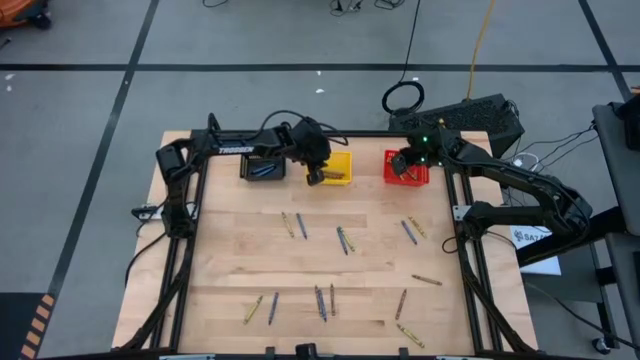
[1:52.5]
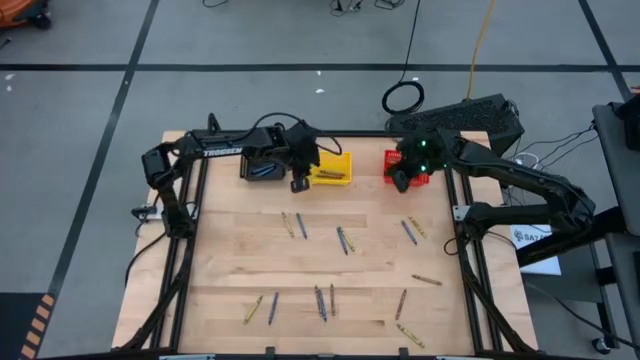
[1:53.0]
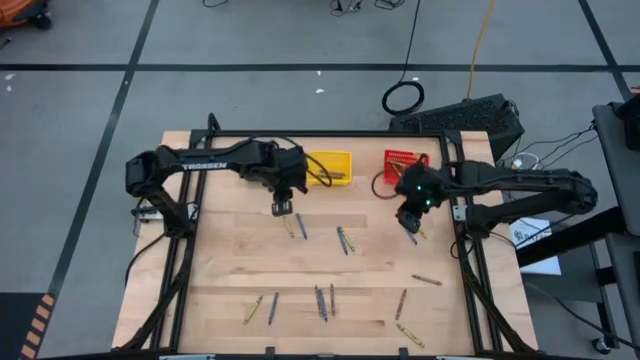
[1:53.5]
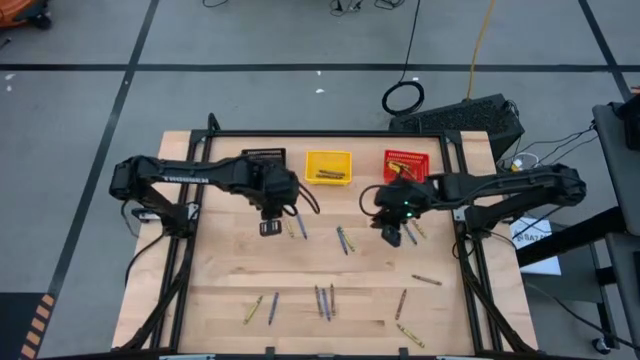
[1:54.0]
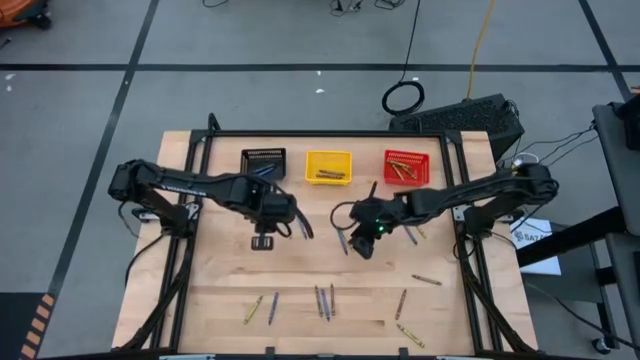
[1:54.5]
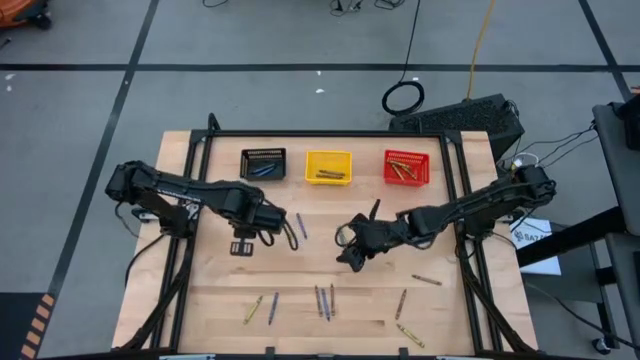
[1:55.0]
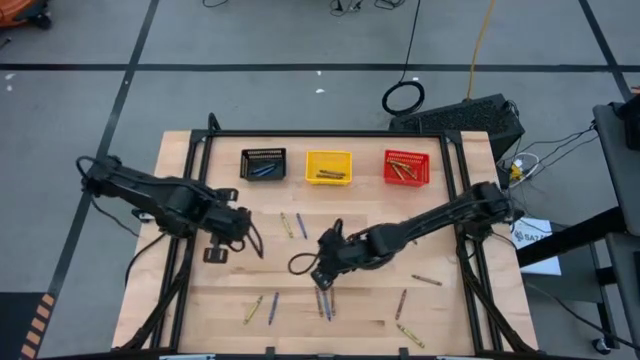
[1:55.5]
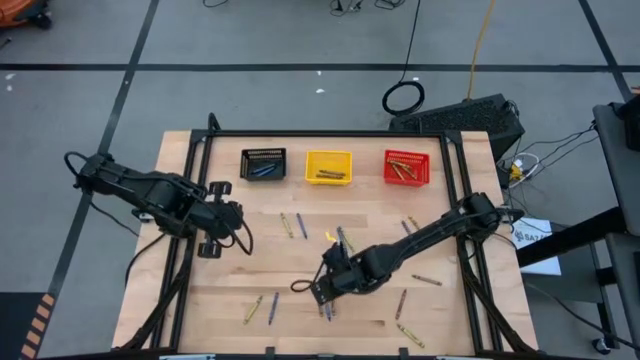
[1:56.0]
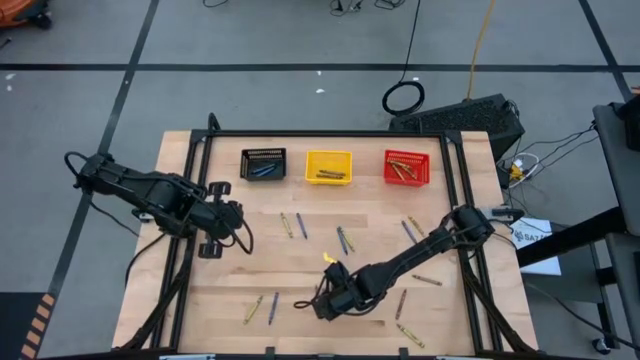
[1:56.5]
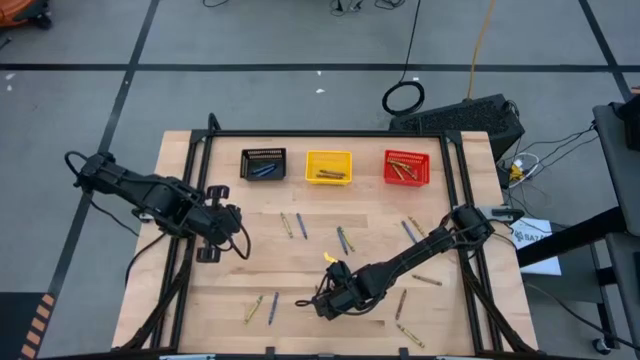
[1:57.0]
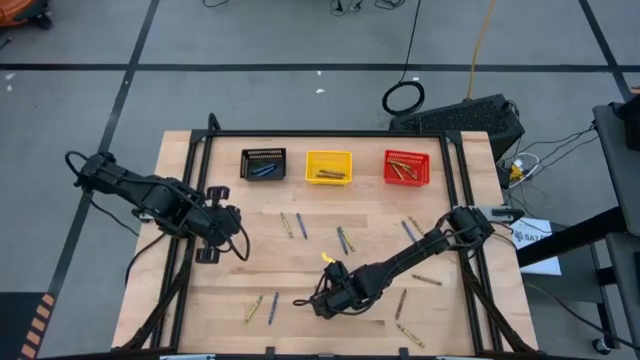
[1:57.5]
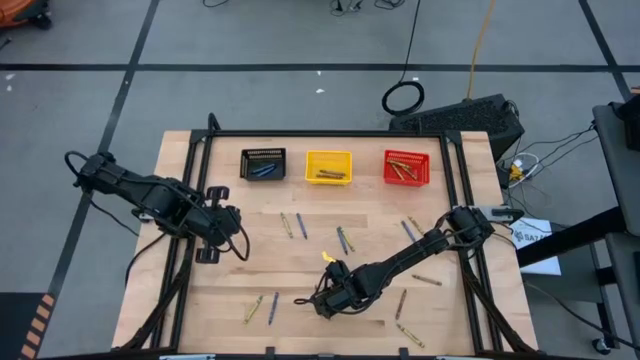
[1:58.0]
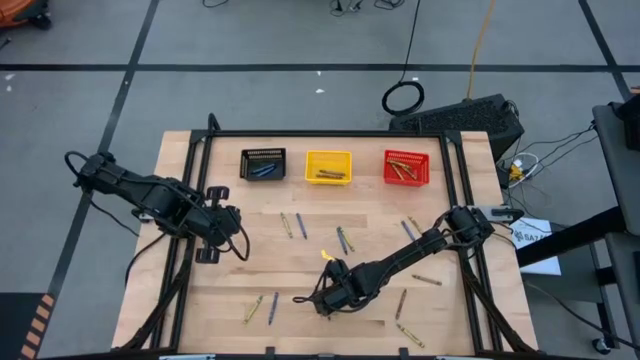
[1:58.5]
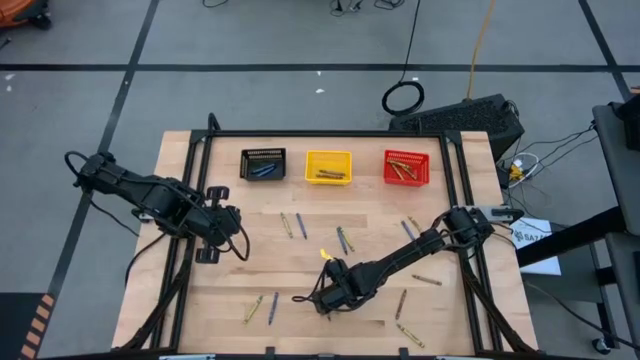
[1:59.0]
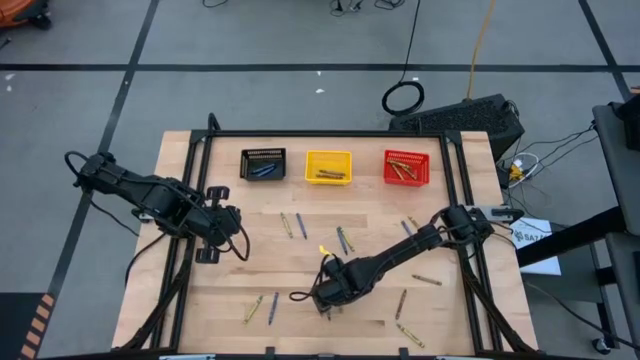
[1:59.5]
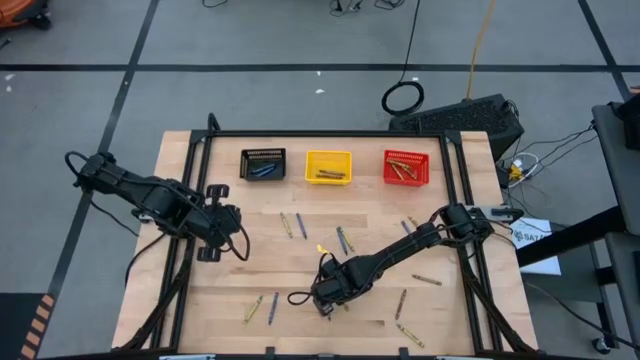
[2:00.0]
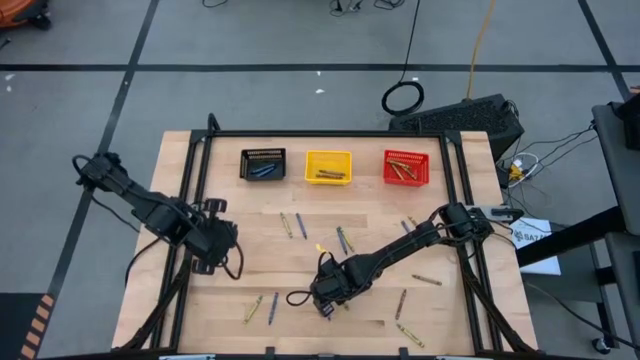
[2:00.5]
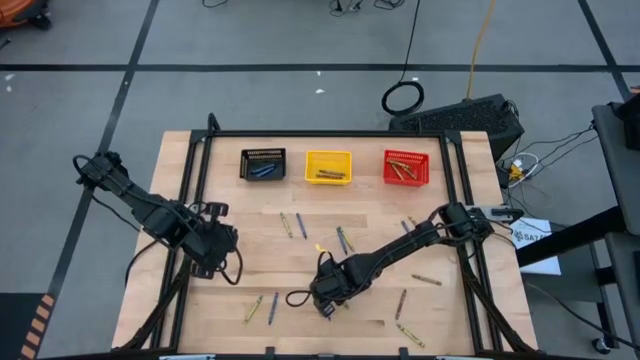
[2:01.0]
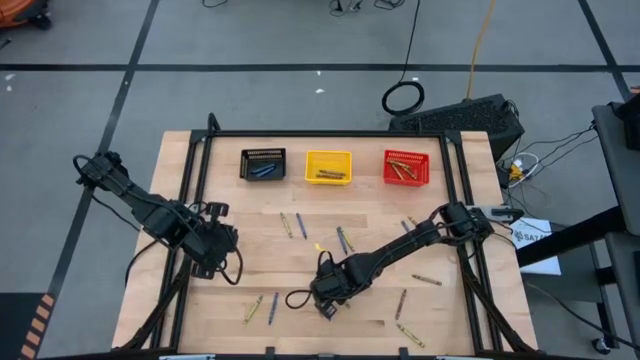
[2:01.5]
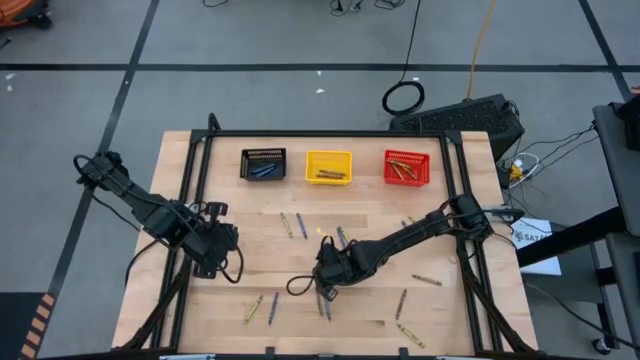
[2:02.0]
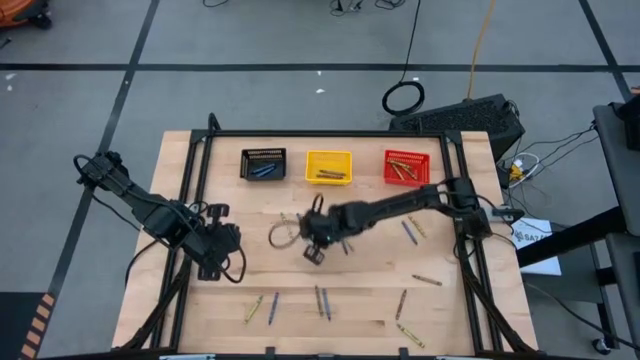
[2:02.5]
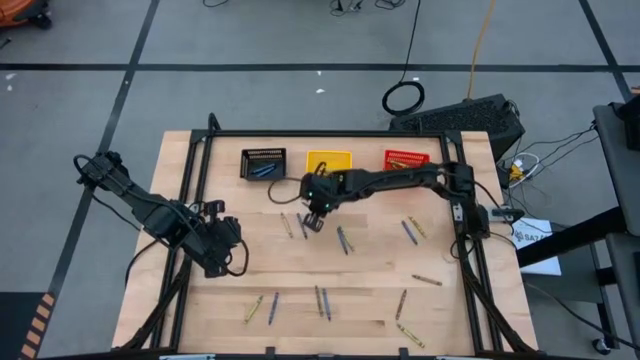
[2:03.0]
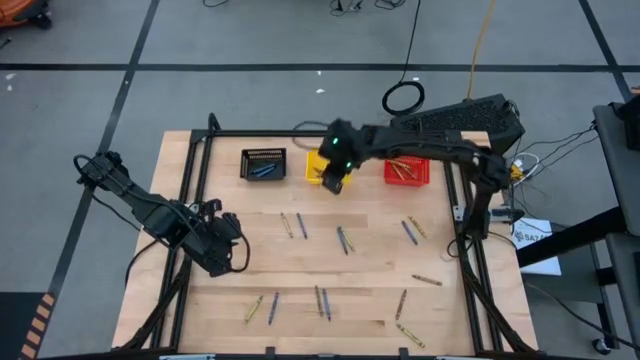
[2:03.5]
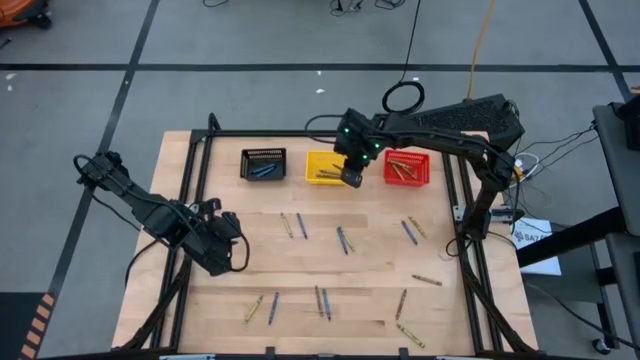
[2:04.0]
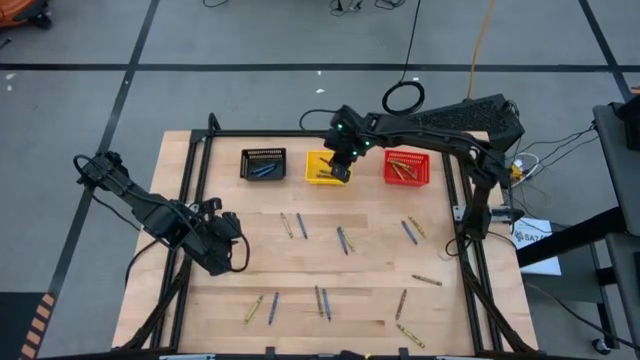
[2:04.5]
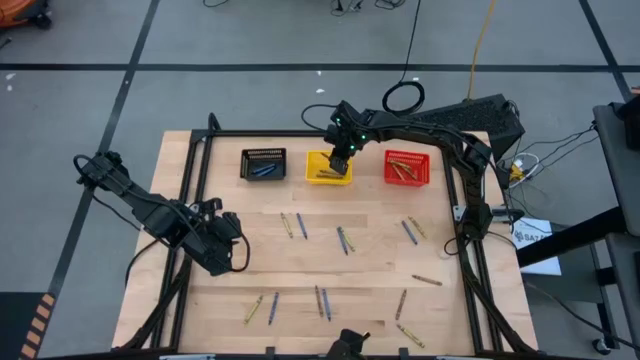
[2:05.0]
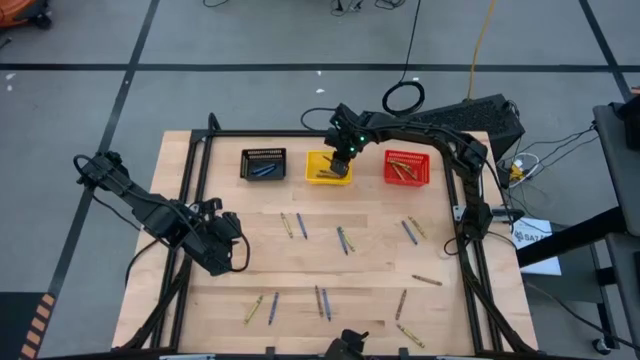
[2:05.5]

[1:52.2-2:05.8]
Task: Sort crayons
Put the brown crayon into the yellow bin

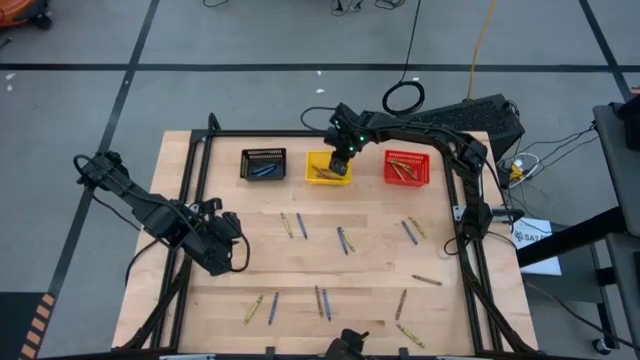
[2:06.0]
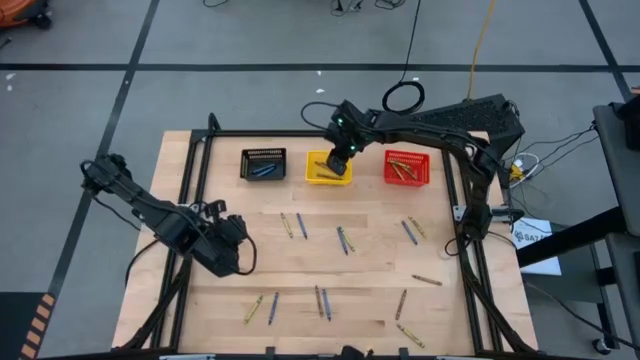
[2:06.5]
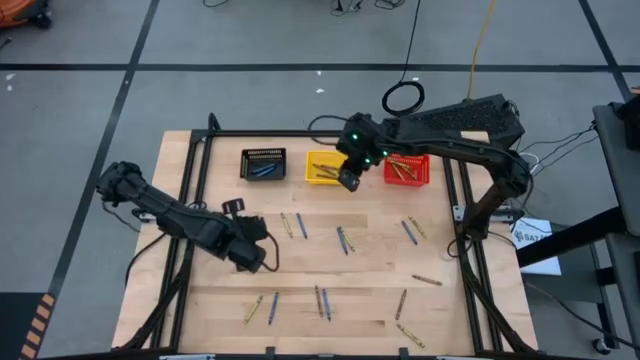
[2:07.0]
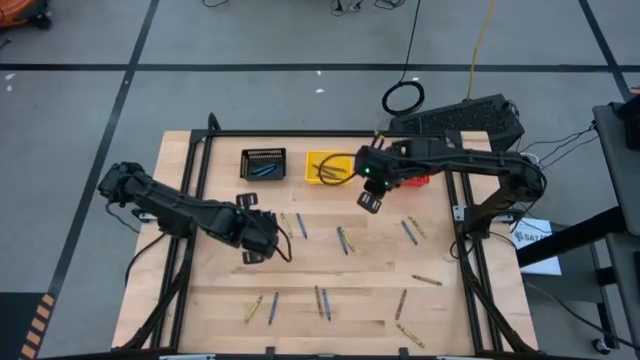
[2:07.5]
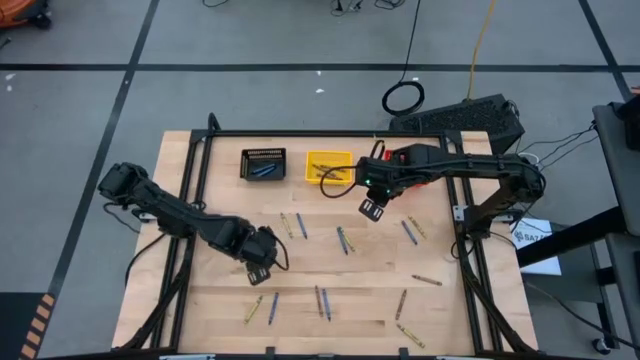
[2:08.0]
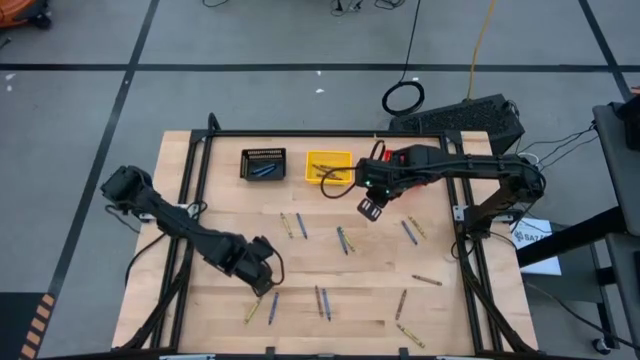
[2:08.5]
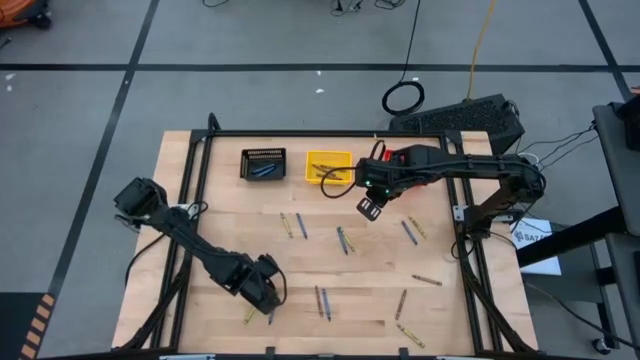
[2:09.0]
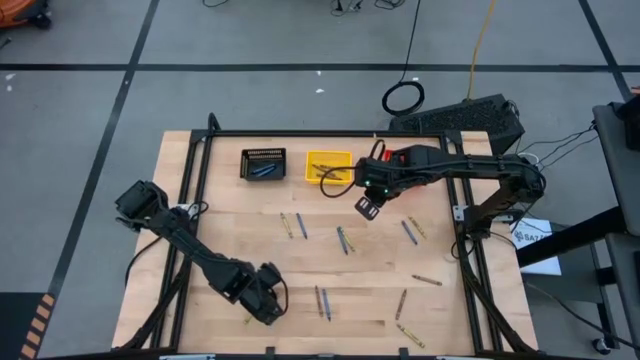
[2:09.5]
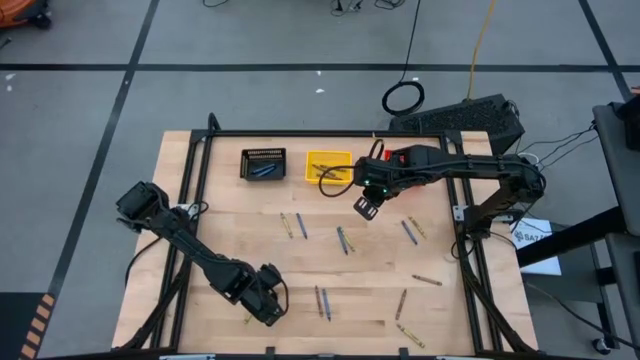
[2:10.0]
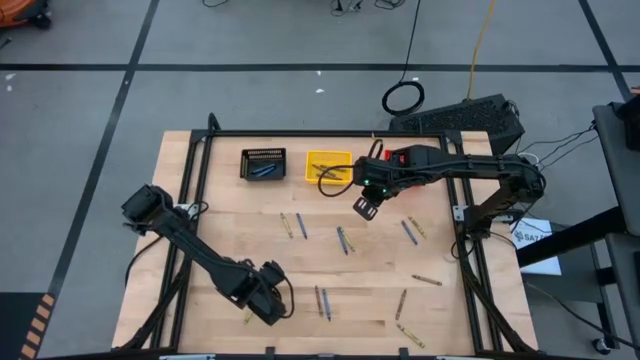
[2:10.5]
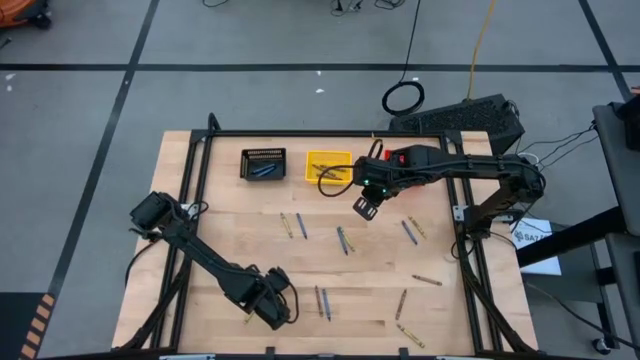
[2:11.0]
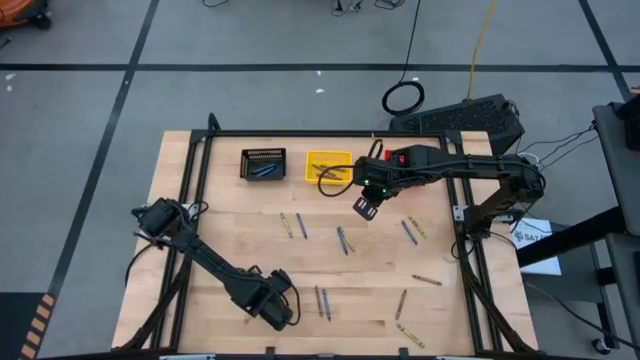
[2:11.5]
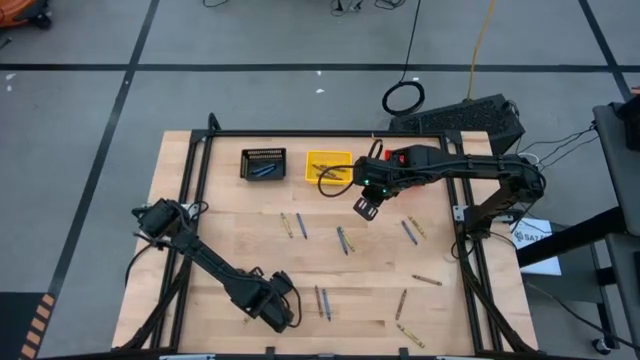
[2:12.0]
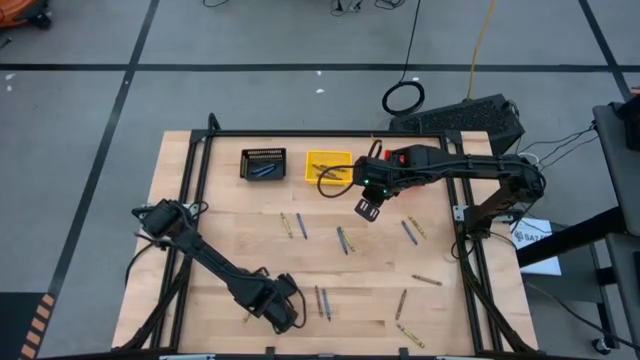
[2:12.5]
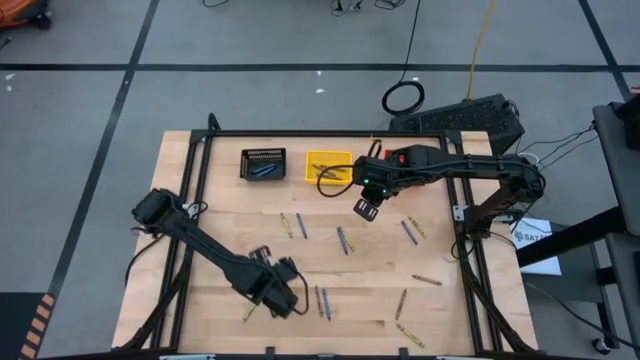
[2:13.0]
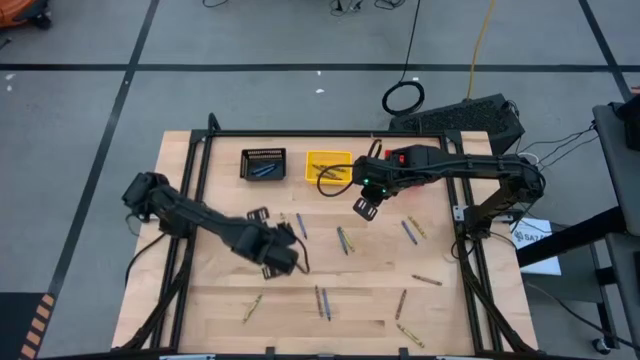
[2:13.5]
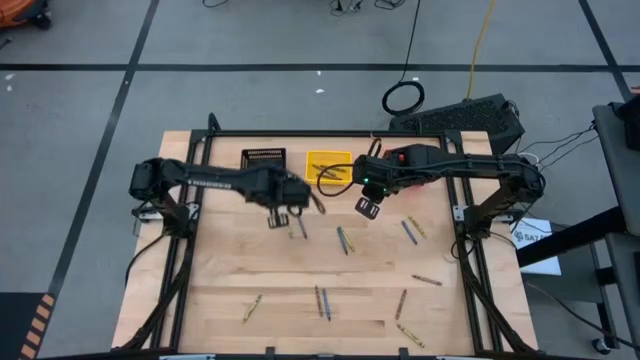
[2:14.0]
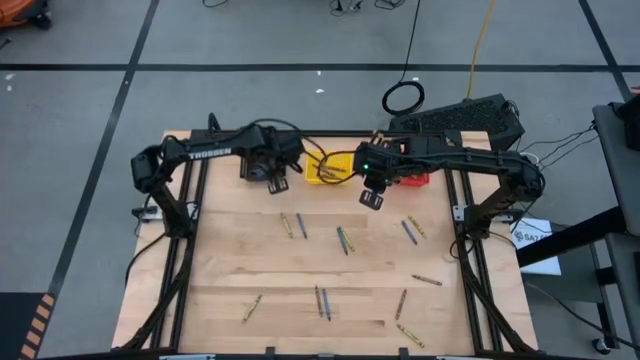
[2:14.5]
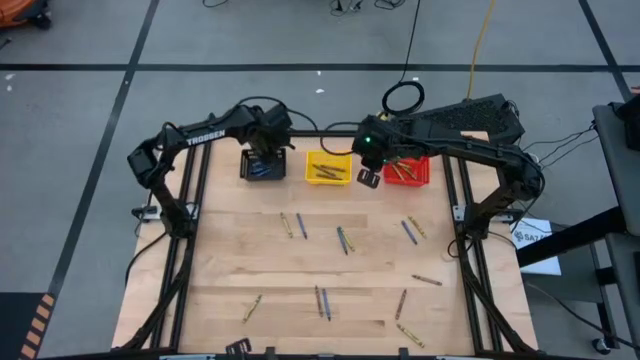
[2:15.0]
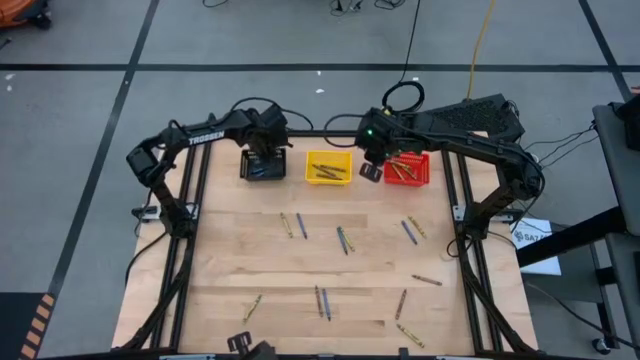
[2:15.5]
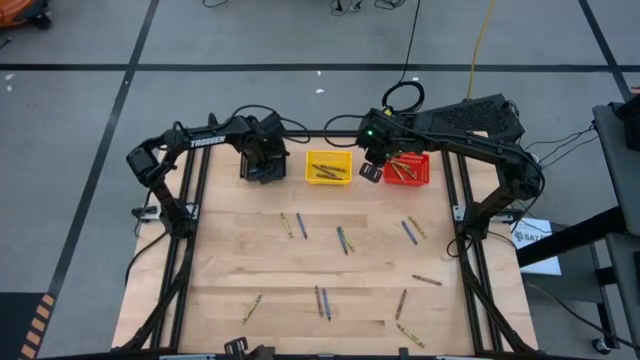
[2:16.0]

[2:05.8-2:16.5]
Put the blue crayon into the black bin
